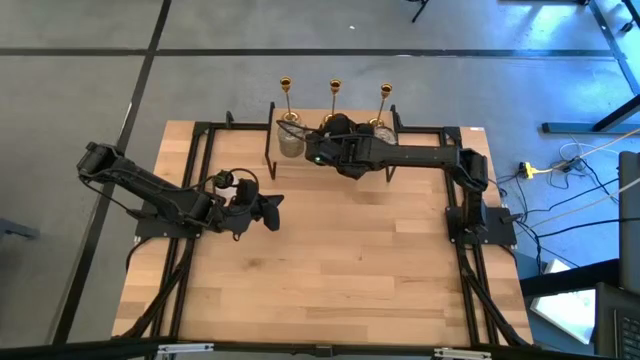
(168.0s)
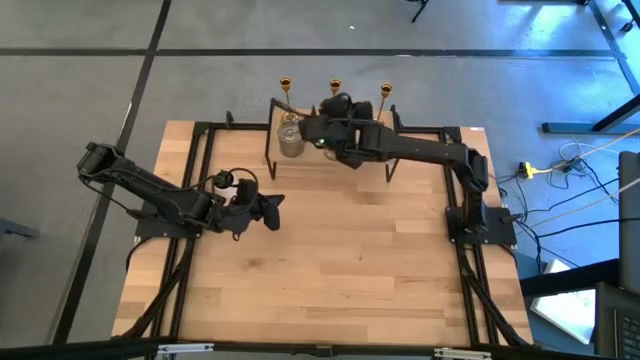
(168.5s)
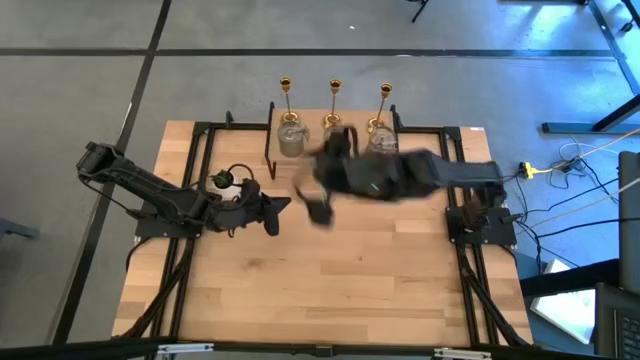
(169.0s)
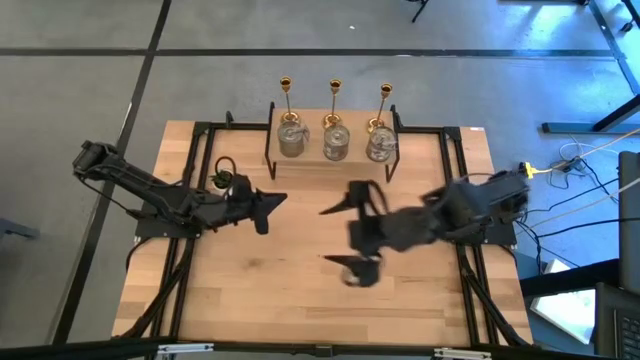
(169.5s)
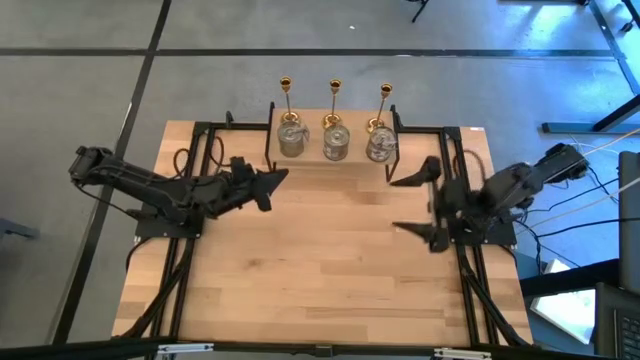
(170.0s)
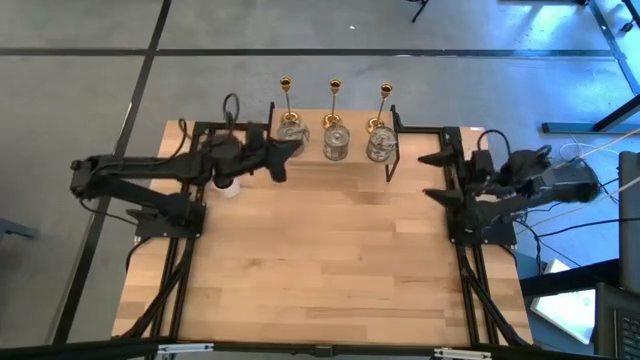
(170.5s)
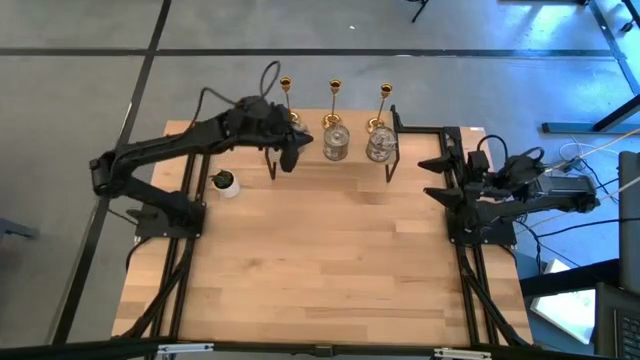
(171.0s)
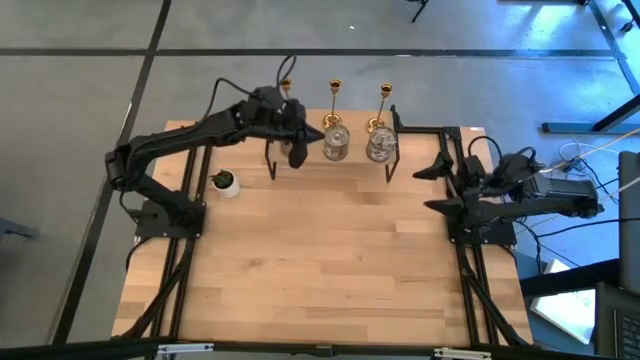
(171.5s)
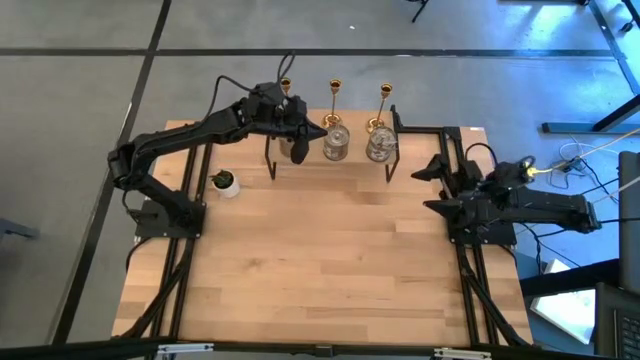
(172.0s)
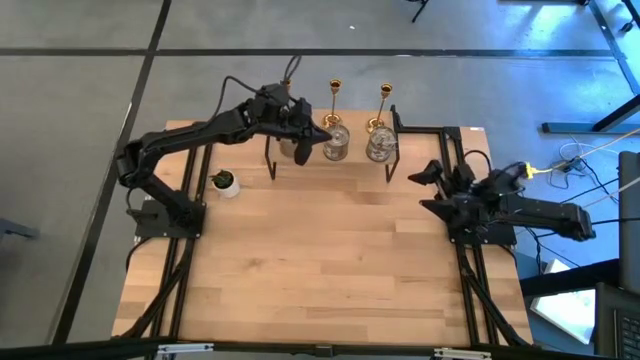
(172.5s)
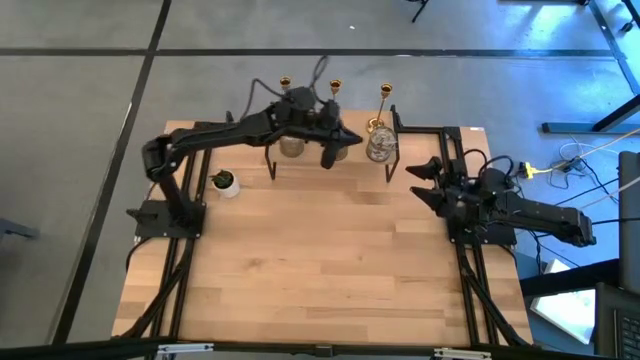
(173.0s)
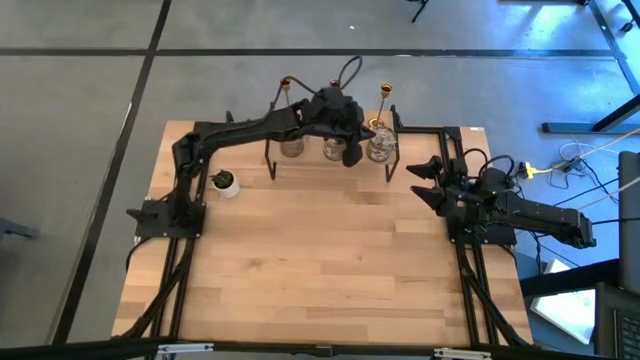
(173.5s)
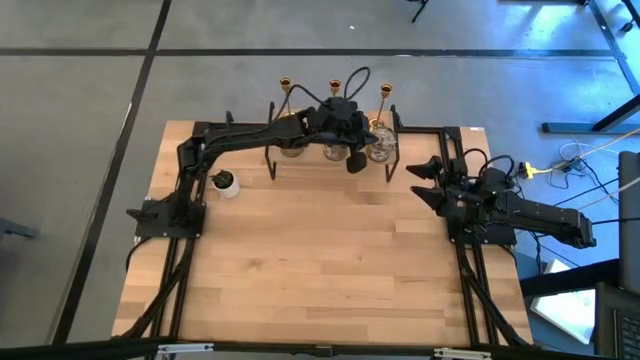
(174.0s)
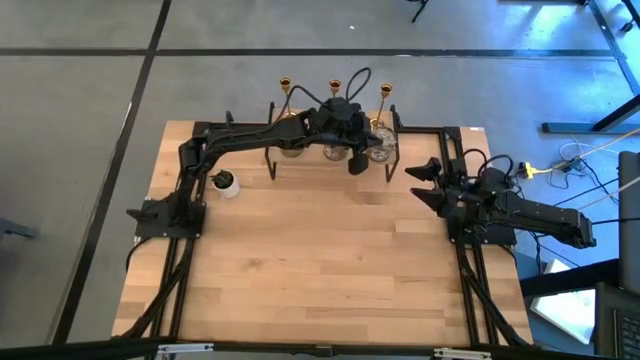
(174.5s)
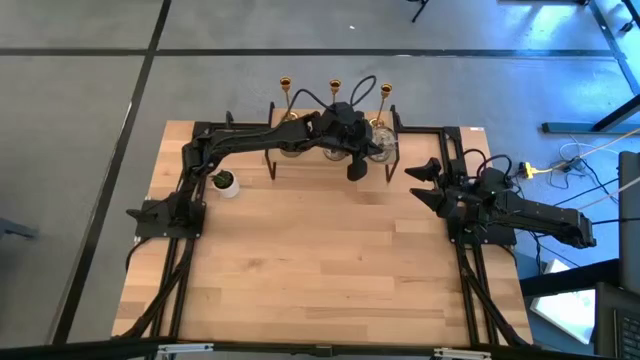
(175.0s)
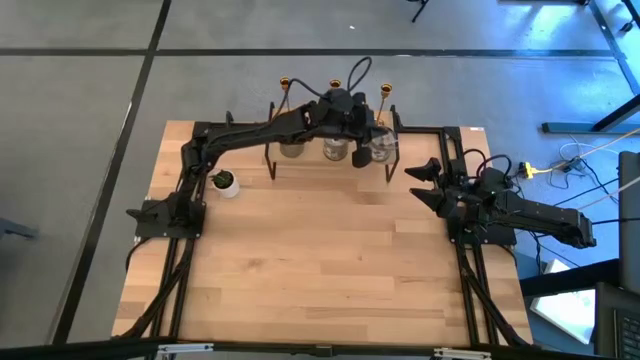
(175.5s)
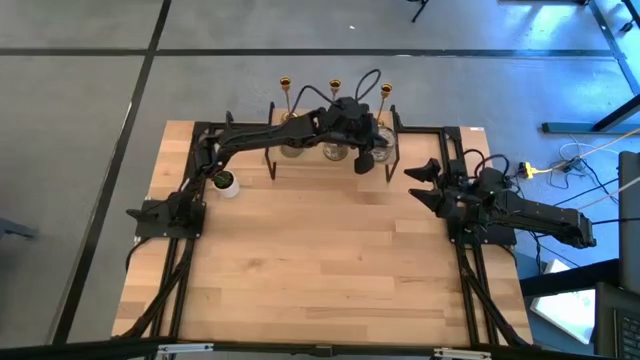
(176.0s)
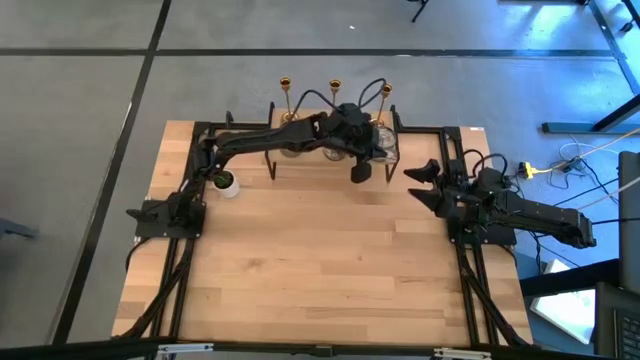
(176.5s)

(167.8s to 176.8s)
Task: Pick & Place candle stick holders
Adjust the right silver scented candle on the shelf

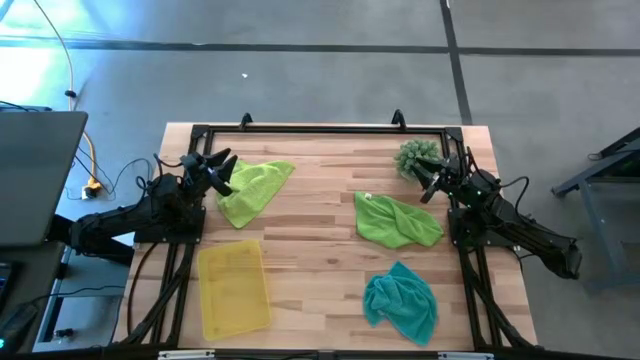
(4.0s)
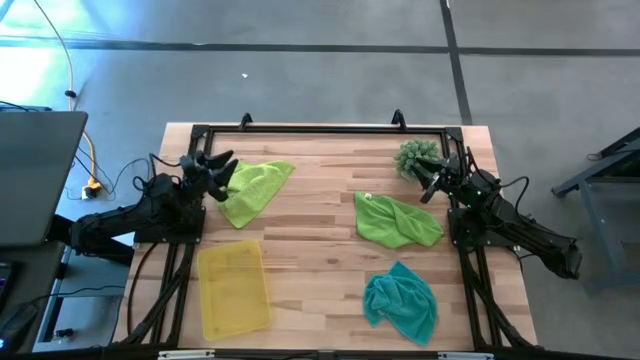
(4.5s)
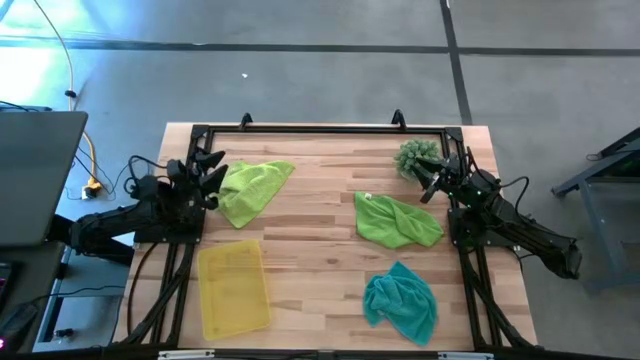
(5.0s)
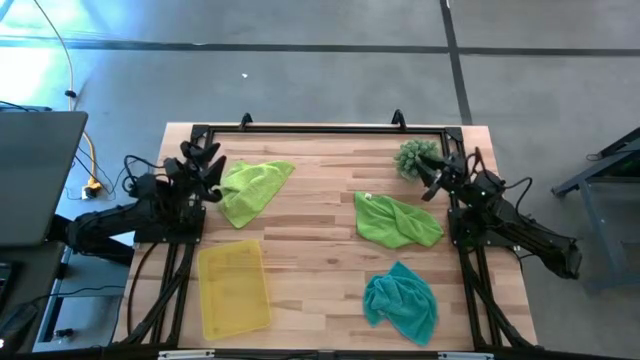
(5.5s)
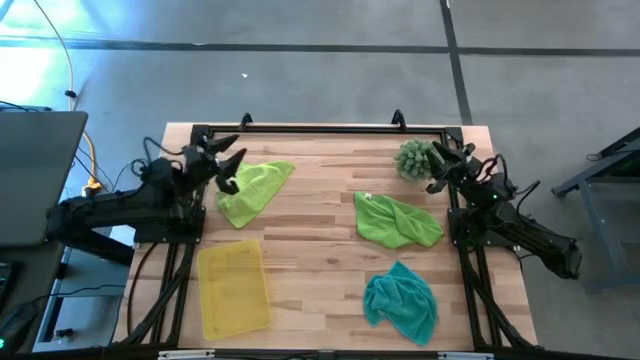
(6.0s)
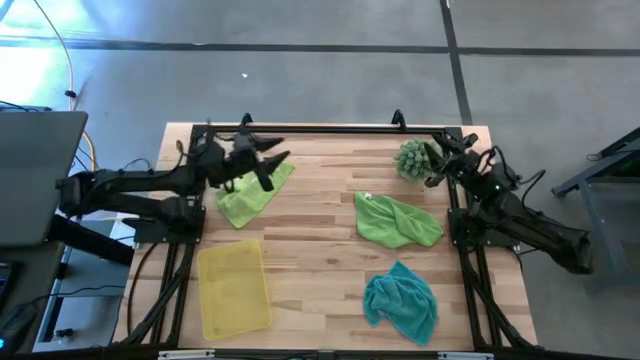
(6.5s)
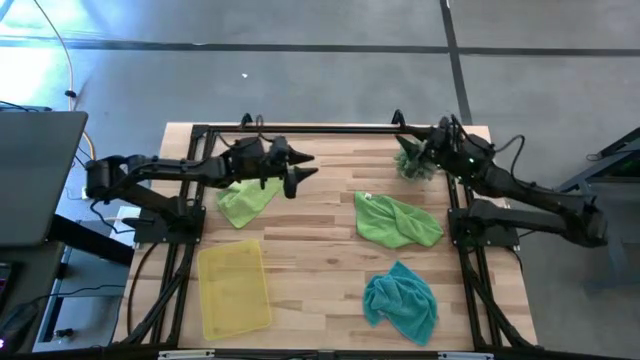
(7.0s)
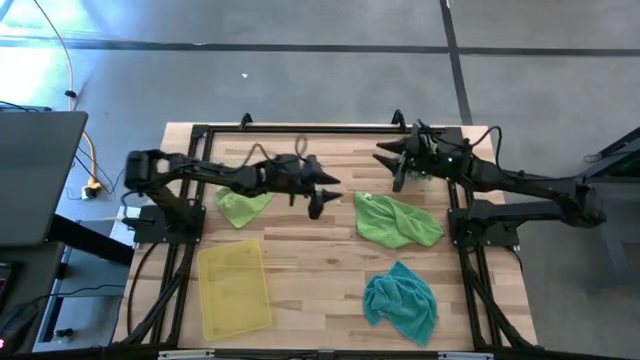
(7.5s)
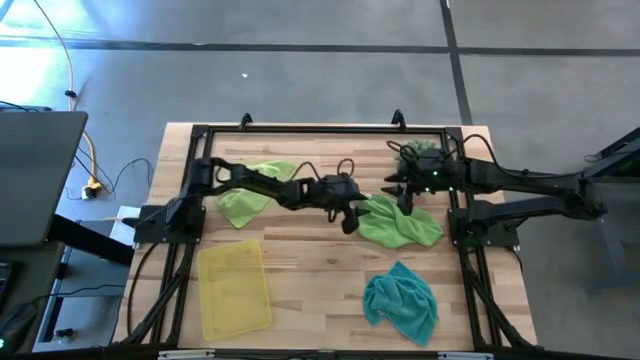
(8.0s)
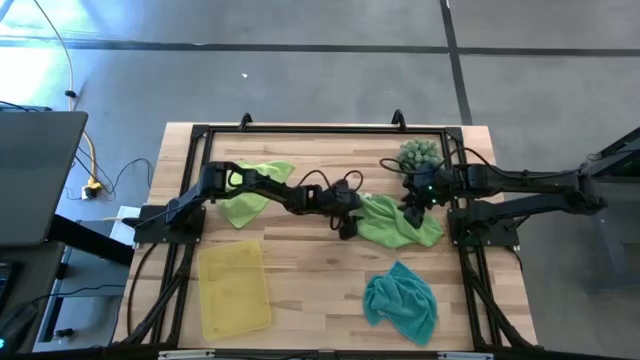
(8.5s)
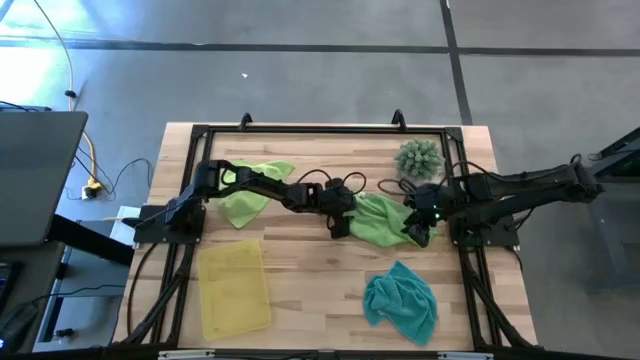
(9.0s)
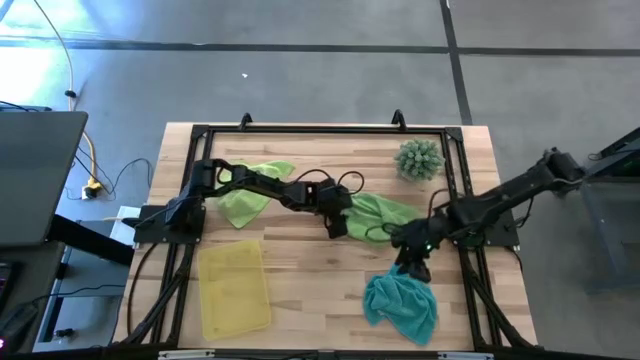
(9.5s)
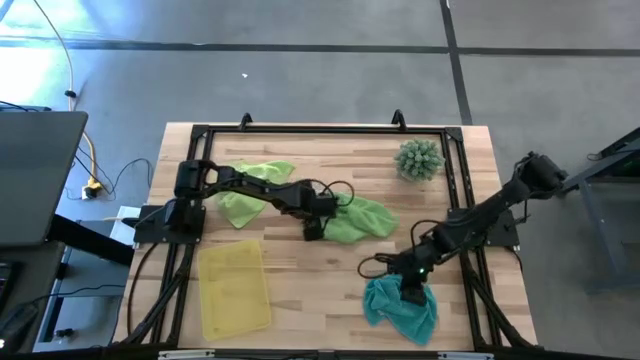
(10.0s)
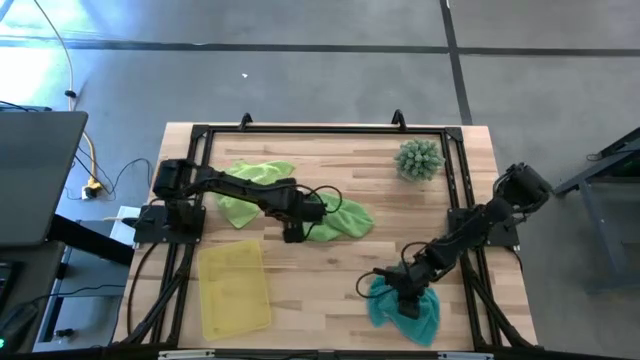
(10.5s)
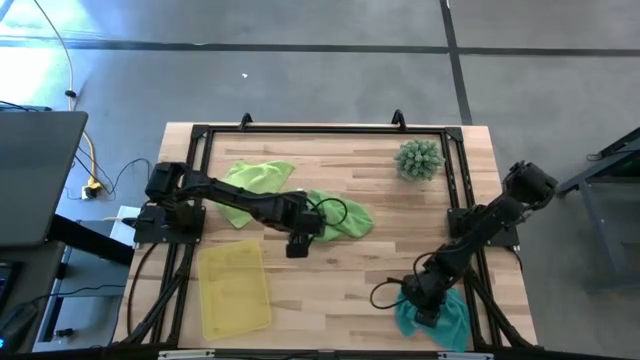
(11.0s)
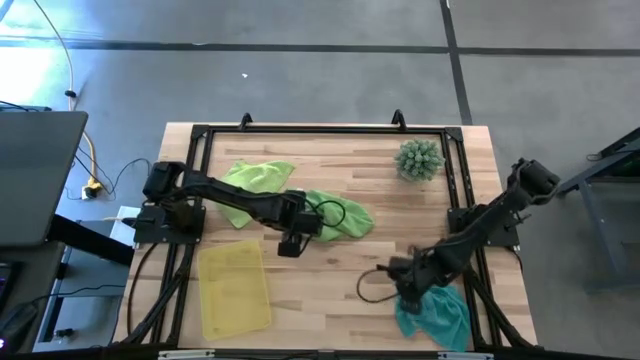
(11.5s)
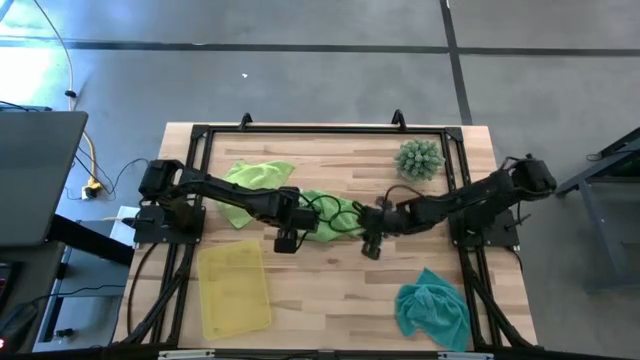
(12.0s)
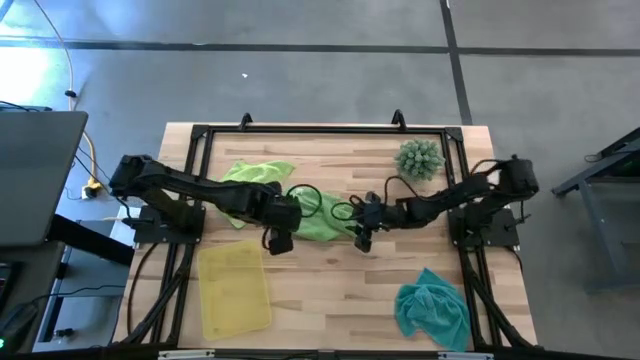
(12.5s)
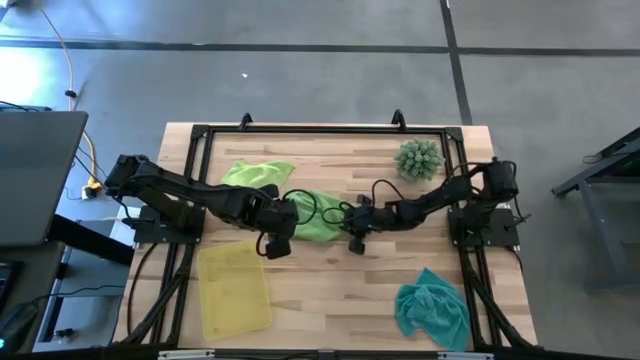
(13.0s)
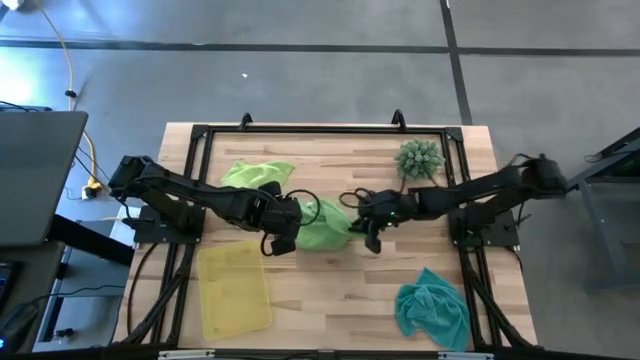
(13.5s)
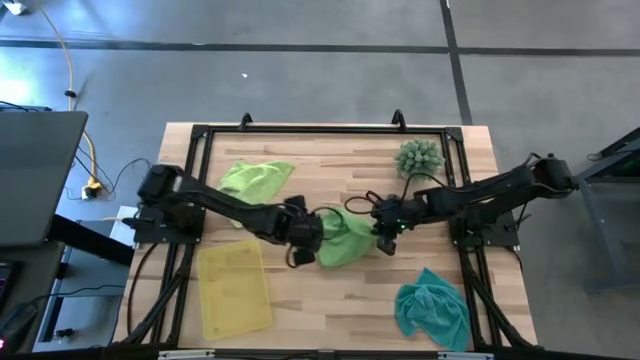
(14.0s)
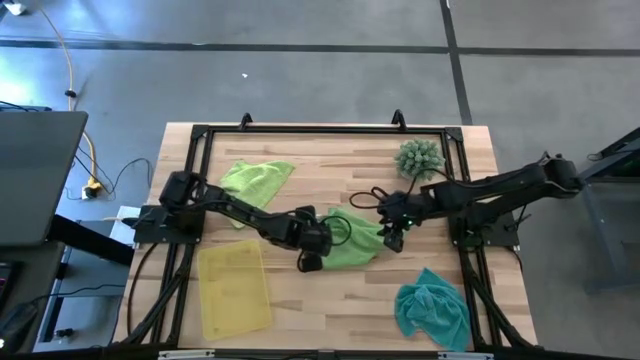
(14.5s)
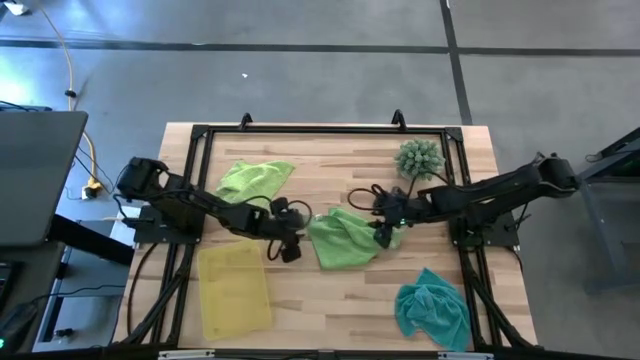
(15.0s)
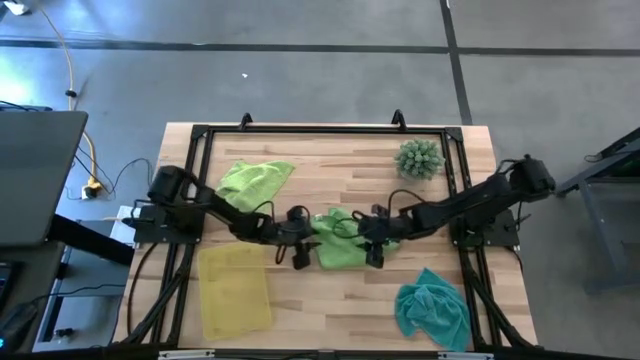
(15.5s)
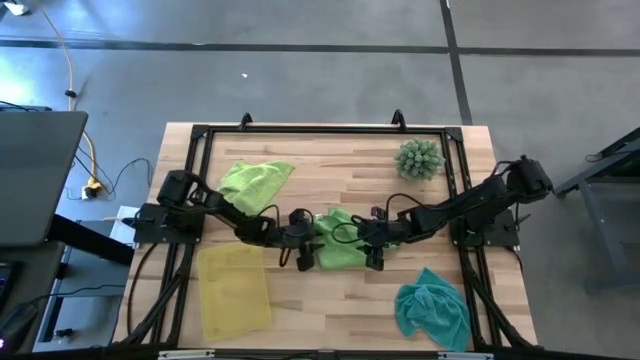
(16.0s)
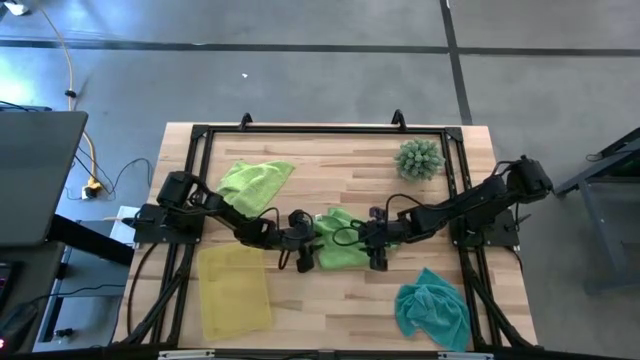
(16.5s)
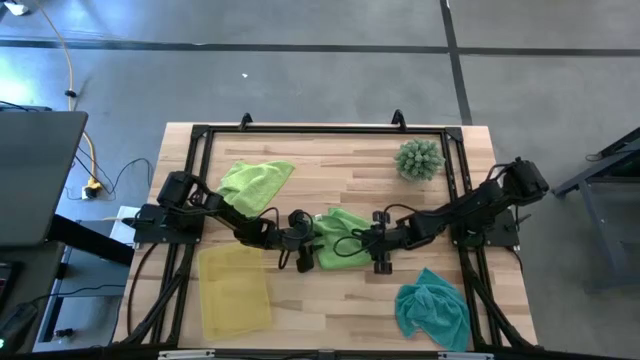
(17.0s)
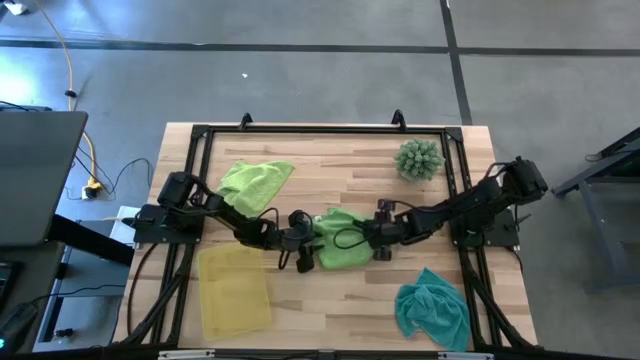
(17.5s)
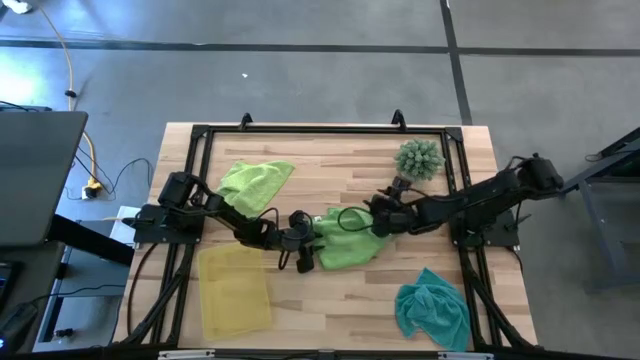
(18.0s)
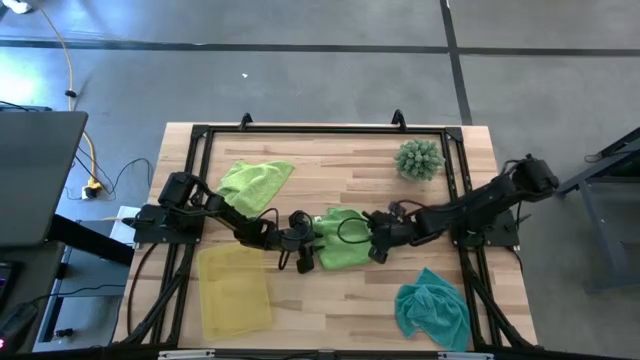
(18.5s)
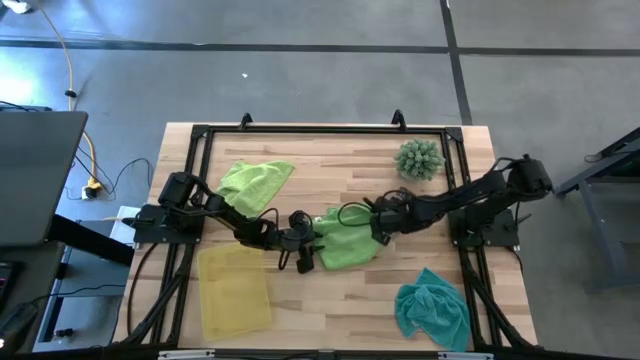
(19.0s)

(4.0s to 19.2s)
Task: Roll microfiber towels into tight, uniform cylinder then place into a basket
Fold the green microfiber towel
